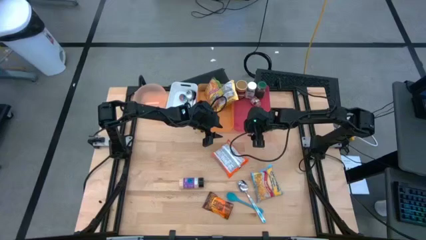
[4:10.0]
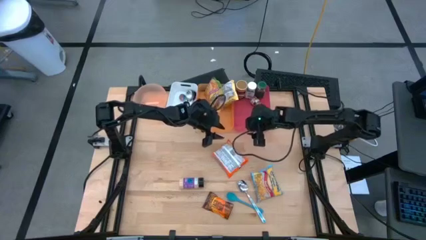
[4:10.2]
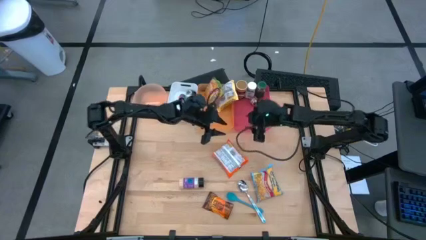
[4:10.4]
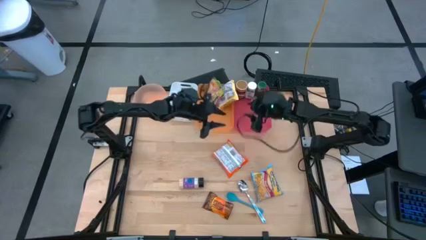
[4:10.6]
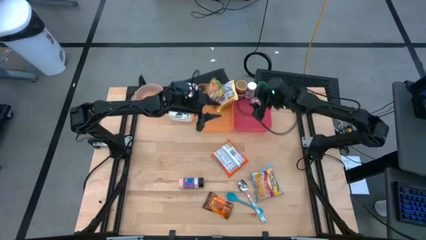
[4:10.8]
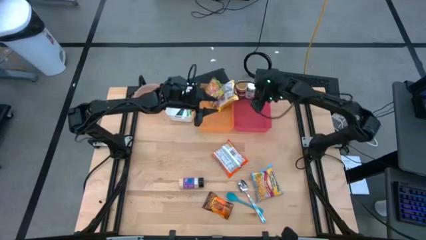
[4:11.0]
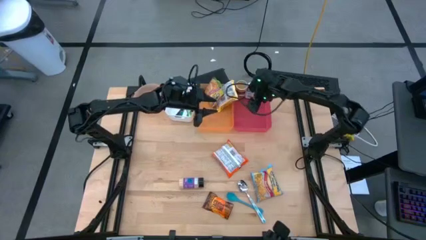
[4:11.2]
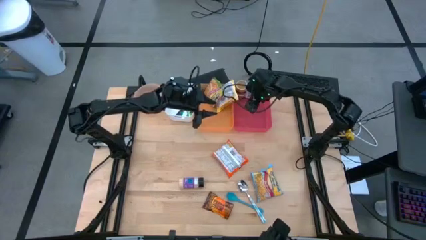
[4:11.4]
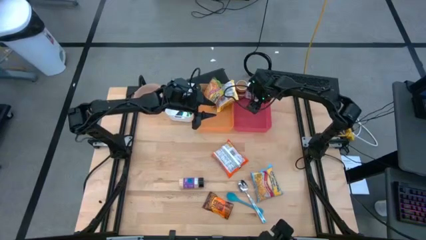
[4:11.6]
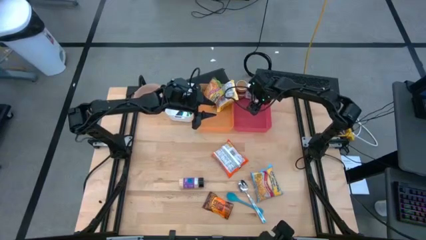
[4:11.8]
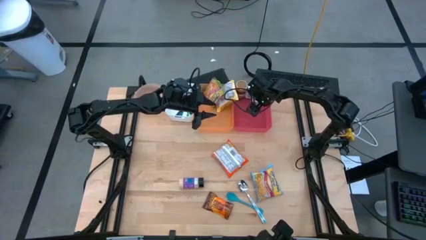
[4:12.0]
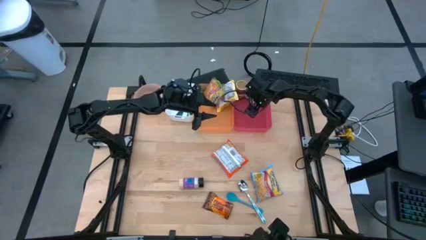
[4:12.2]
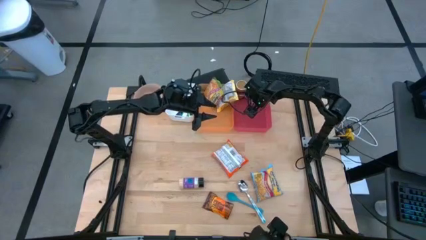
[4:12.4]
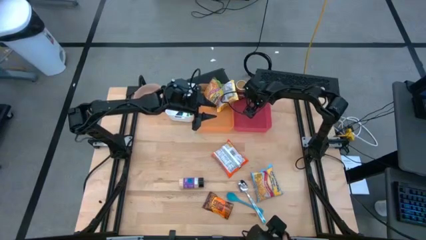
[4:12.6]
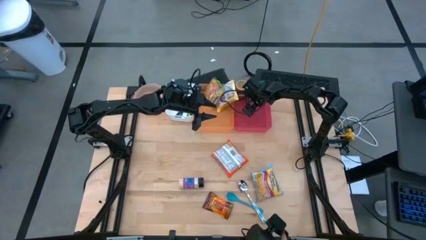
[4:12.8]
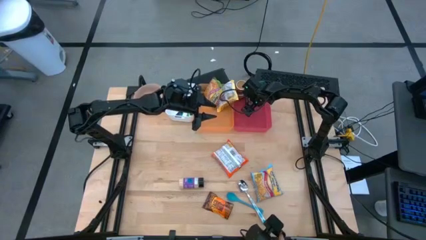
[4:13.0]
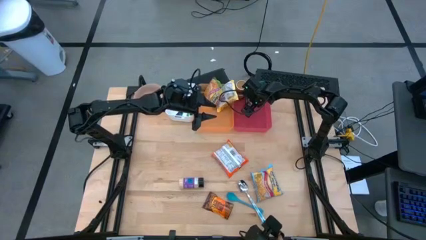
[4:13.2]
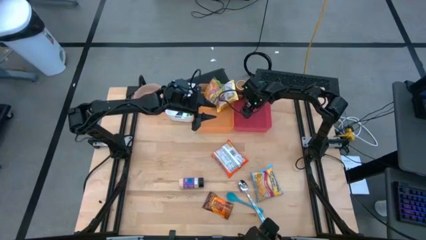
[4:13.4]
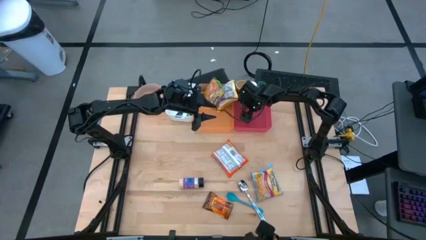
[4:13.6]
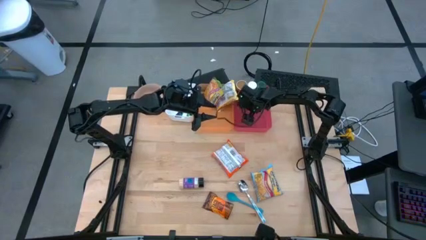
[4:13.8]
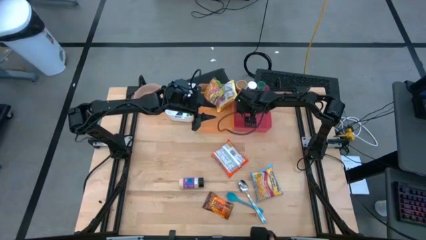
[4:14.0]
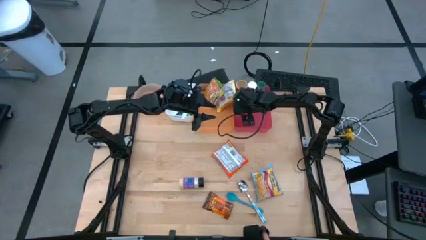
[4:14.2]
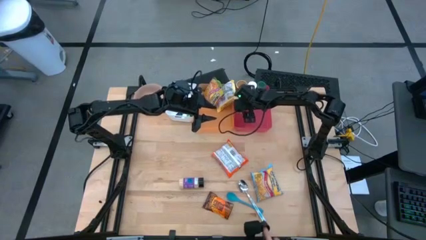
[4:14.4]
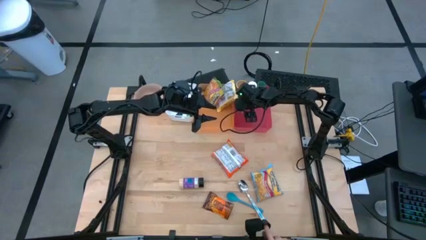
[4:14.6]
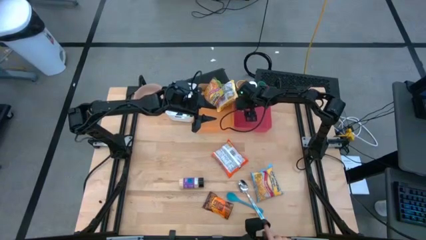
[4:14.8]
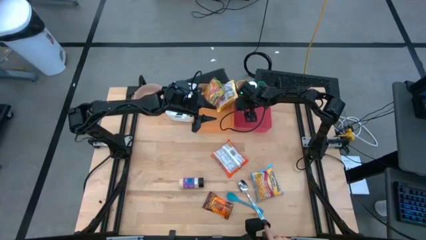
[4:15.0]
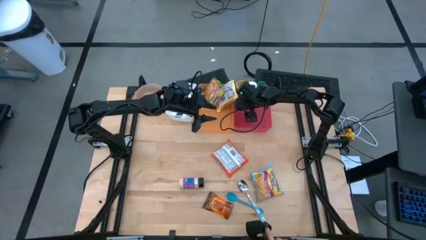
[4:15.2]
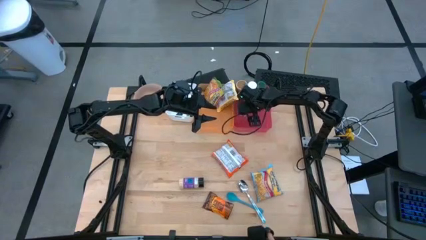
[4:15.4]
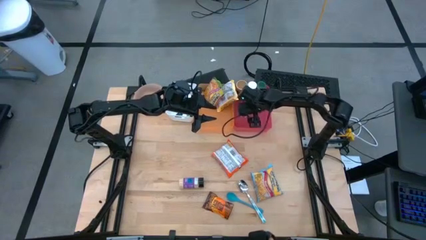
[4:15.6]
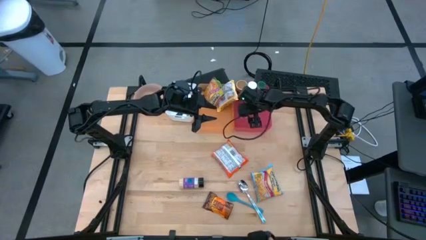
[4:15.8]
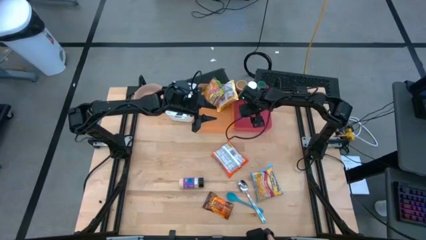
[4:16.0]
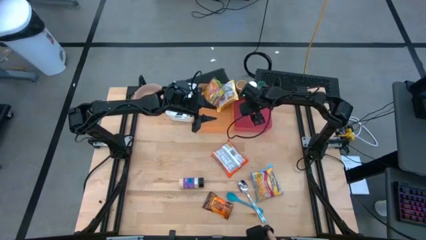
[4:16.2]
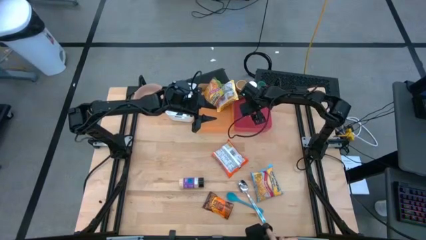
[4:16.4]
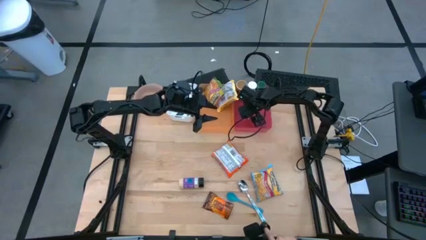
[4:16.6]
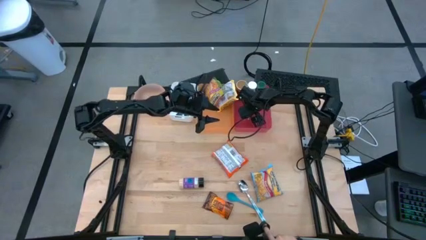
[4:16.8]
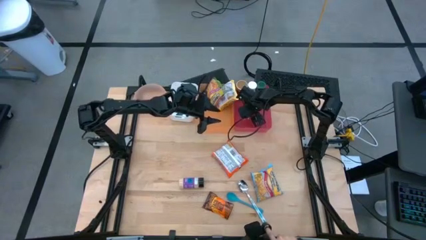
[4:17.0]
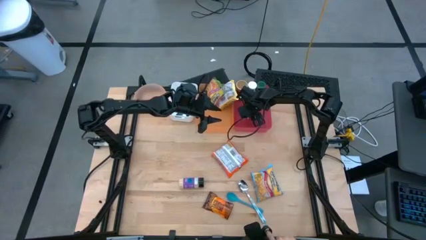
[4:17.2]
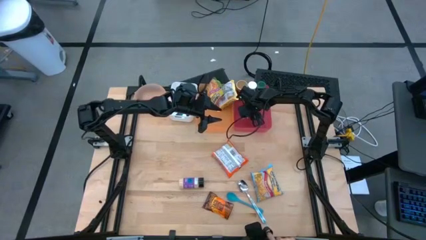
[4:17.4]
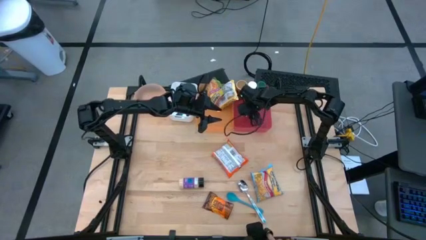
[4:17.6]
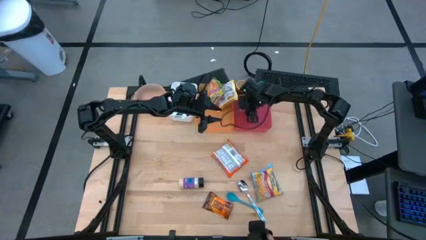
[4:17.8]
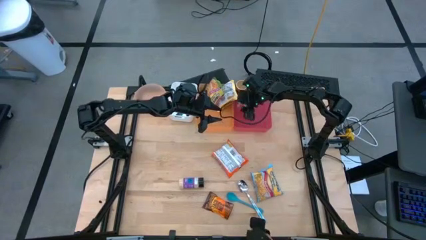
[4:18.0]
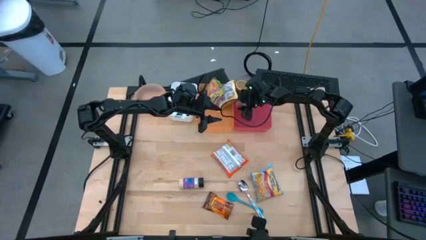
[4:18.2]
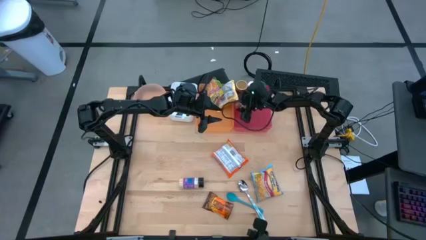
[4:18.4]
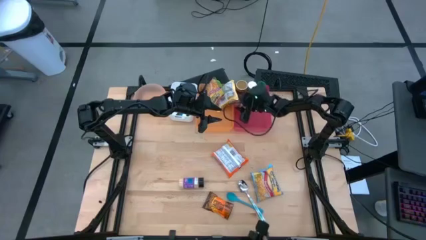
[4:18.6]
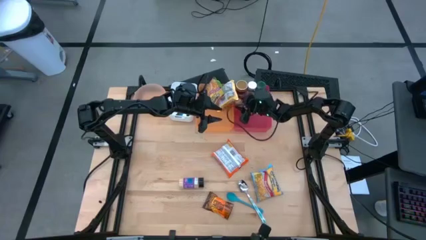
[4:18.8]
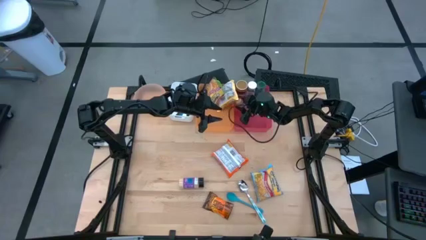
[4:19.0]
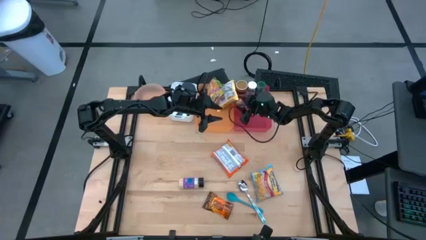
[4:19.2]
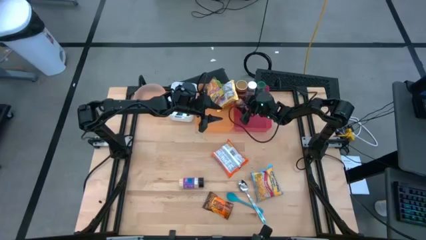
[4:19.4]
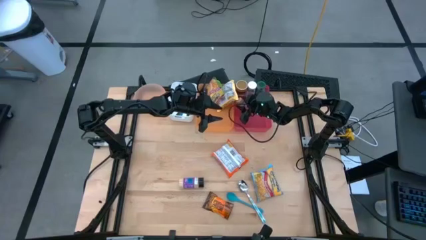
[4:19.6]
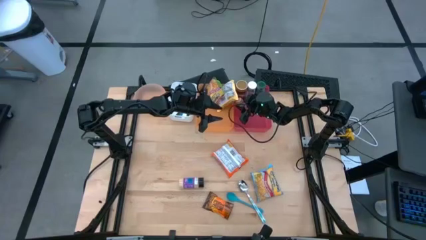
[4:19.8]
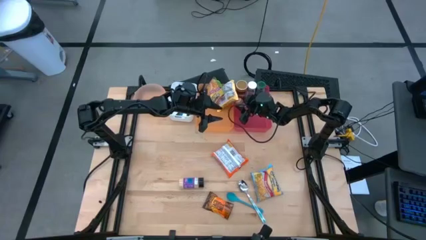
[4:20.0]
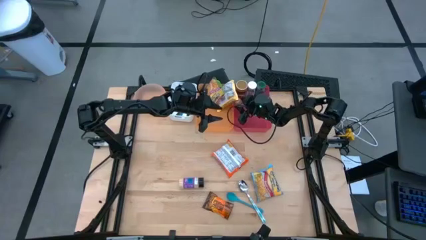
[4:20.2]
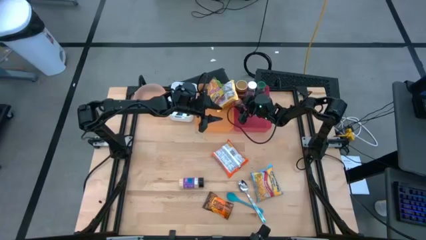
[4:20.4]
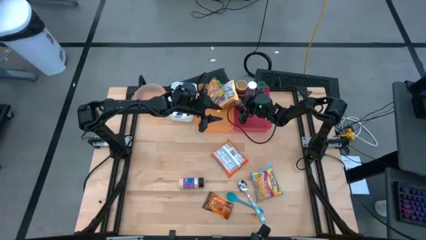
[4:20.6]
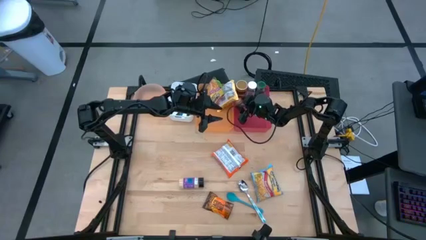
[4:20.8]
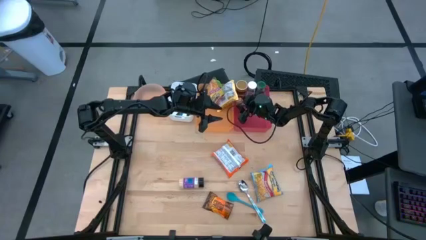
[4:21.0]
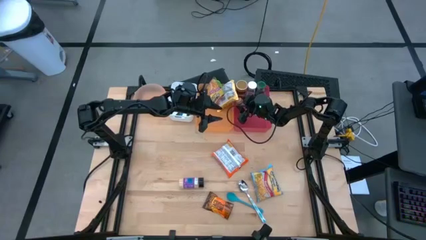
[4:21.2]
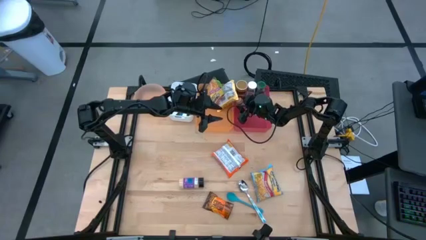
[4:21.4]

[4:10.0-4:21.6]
Task: Pick & Place Food Item
Adjust the brown seasoning bottle in the red bin

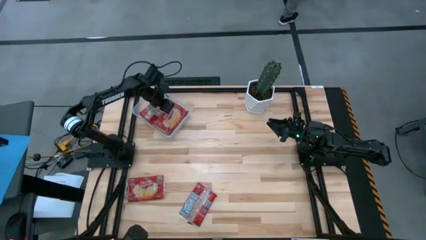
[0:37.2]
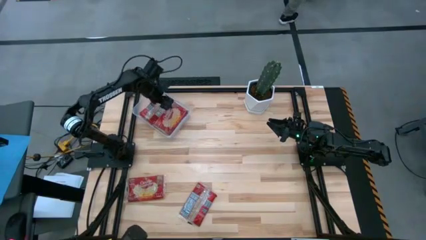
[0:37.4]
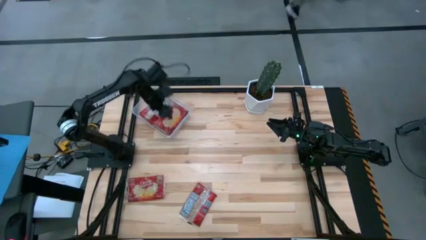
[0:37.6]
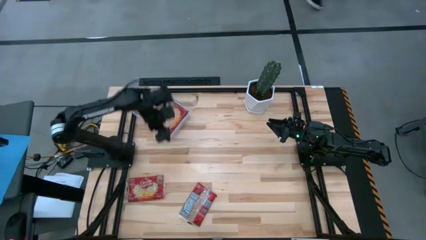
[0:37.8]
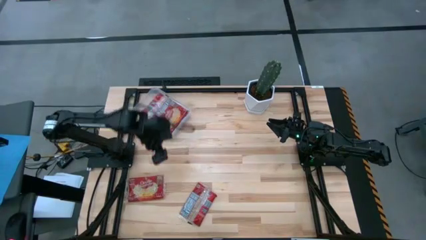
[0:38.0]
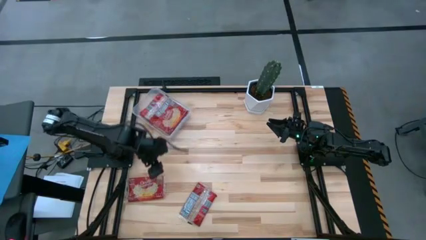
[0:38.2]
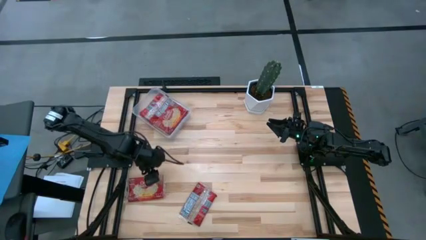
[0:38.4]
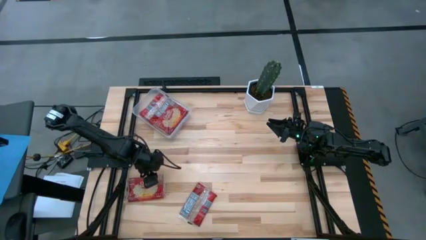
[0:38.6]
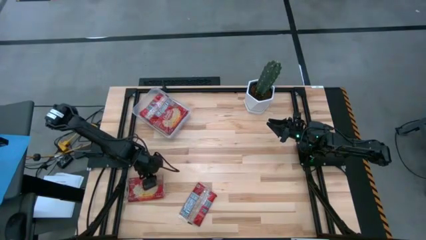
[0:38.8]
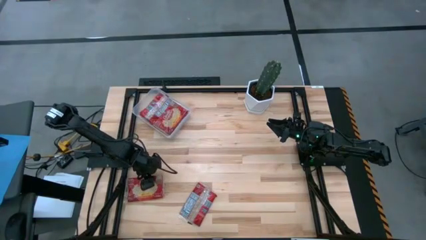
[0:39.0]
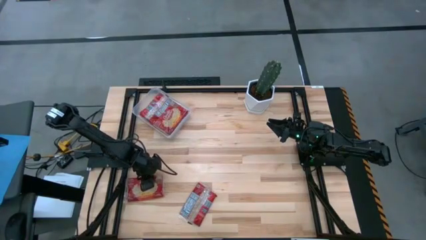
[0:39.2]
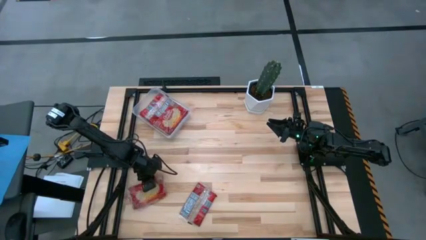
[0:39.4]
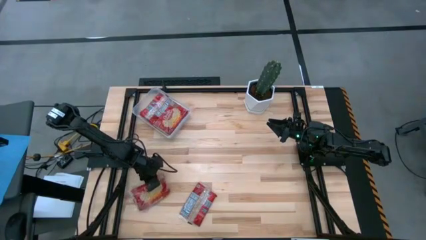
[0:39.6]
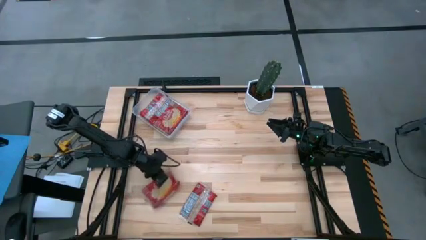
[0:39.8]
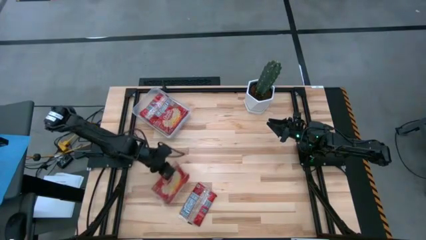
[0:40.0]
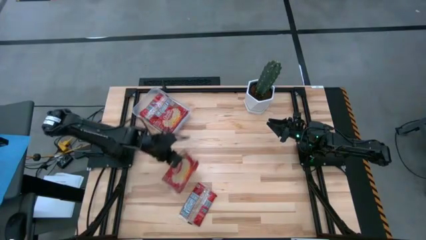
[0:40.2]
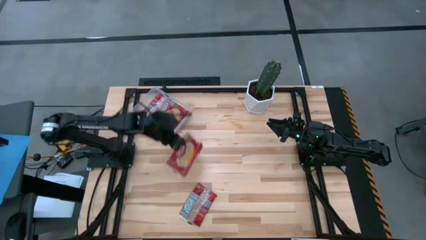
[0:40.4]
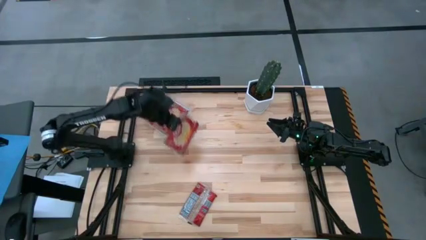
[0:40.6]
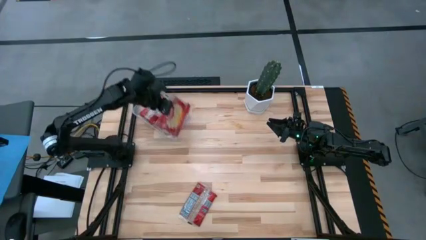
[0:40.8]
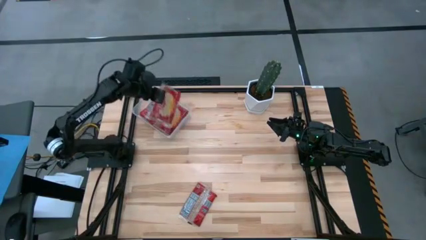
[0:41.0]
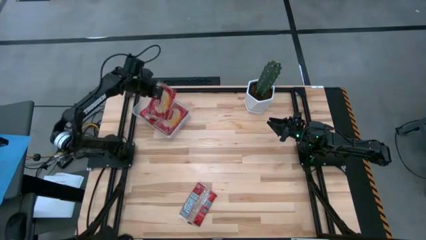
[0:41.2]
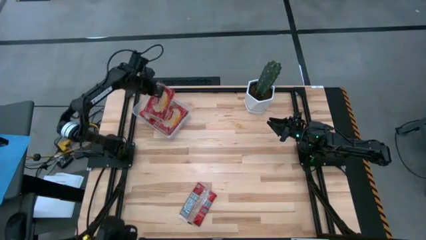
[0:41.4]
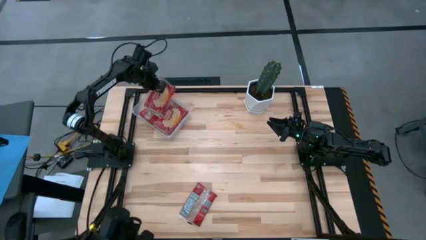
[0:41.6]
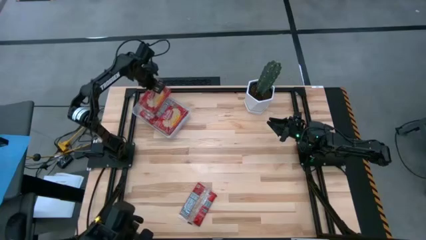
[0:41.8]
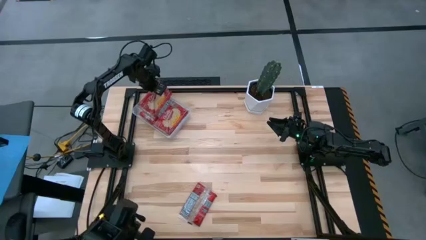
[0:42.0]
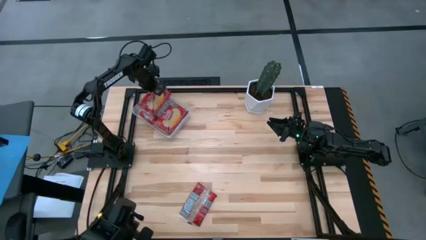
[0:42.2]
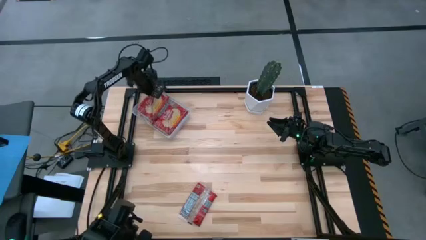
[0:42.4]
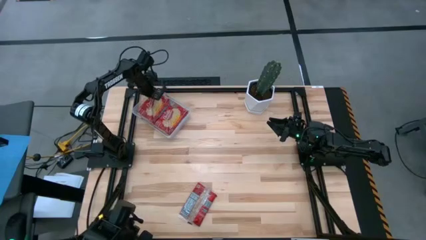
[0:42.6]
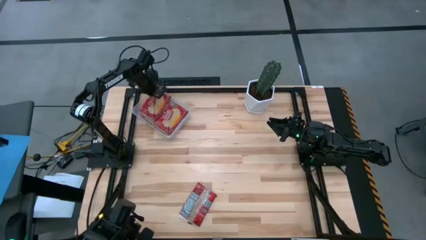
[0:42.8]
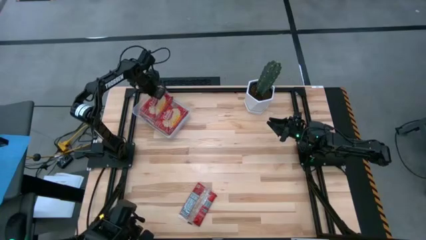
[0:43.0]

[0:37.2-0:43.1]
Task: Sort popcorn bags into baskets
Put the red popcorn bag into the transparent bin
